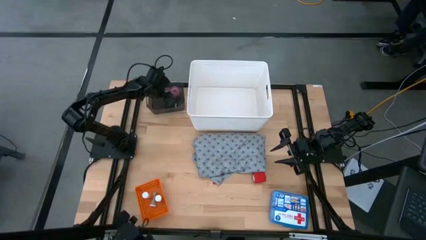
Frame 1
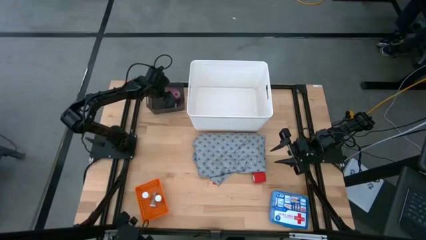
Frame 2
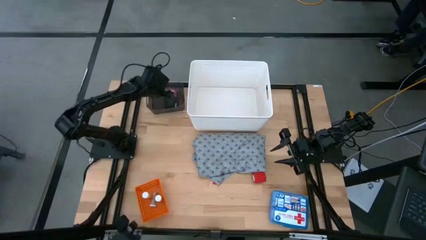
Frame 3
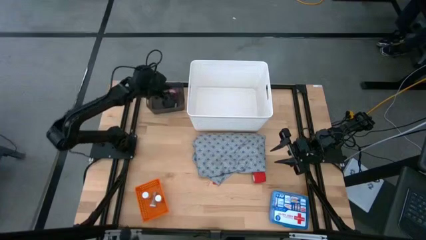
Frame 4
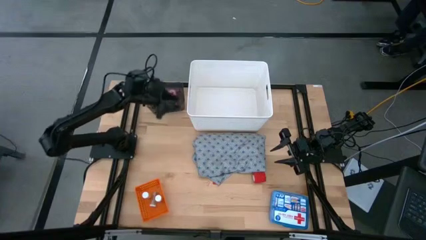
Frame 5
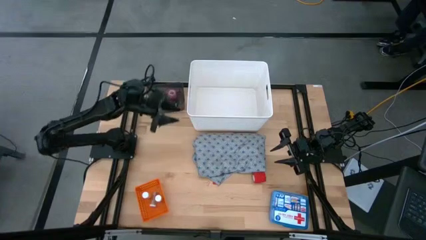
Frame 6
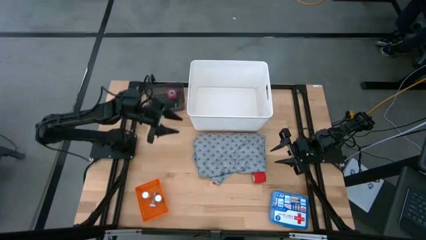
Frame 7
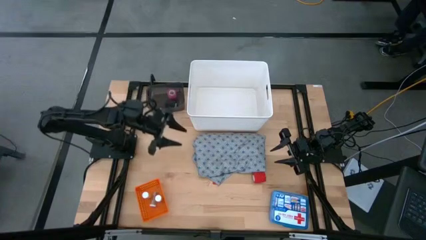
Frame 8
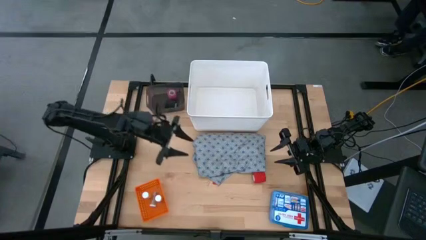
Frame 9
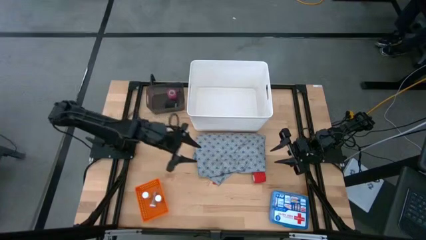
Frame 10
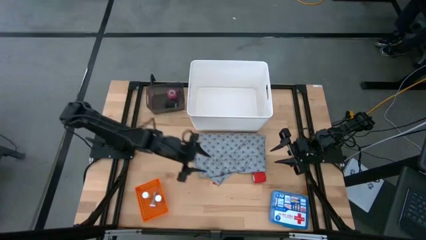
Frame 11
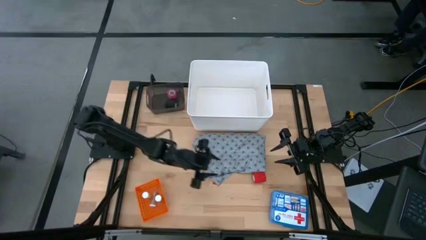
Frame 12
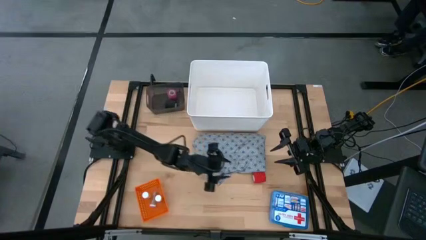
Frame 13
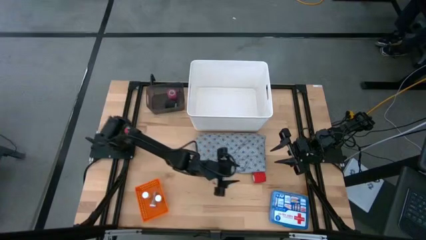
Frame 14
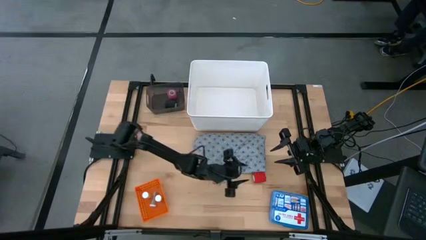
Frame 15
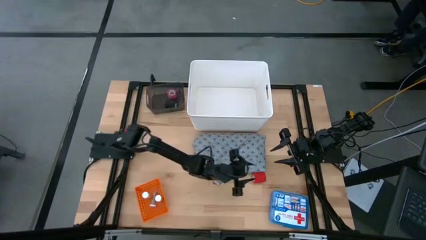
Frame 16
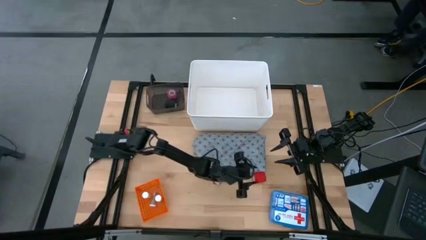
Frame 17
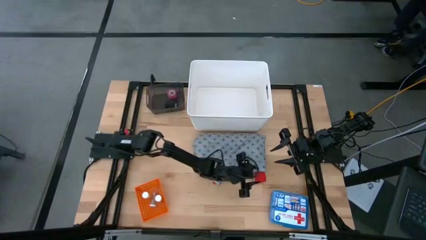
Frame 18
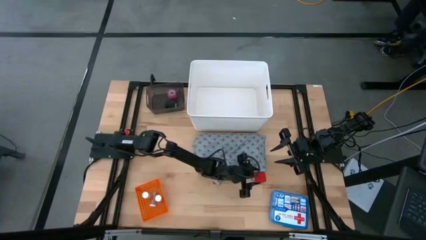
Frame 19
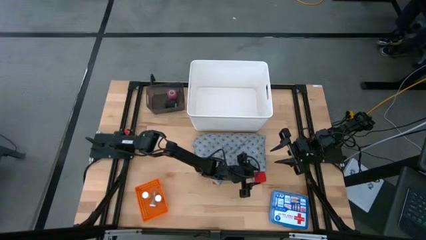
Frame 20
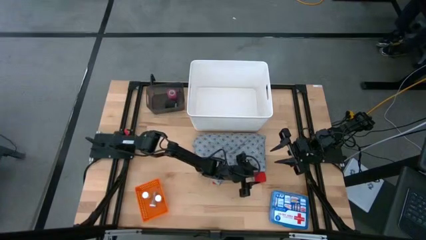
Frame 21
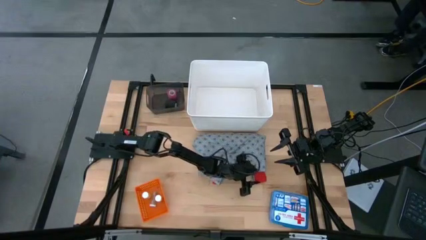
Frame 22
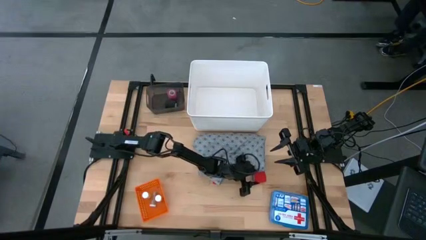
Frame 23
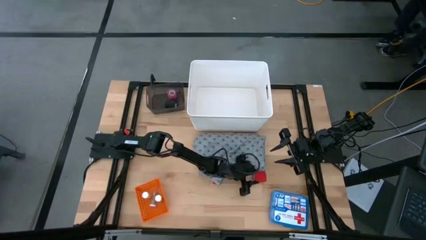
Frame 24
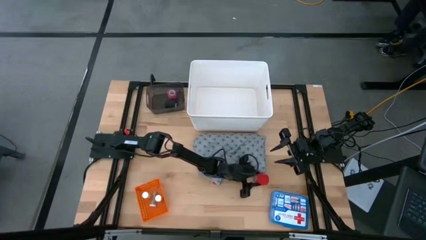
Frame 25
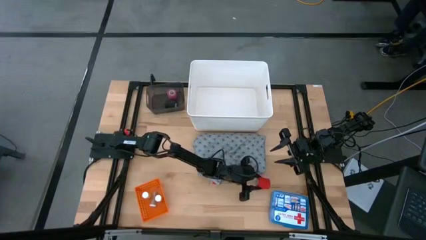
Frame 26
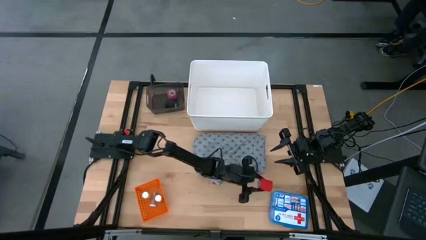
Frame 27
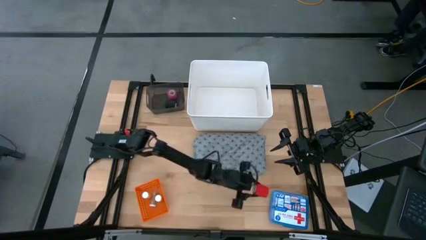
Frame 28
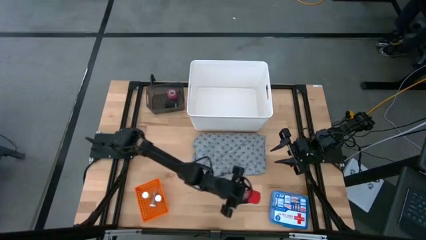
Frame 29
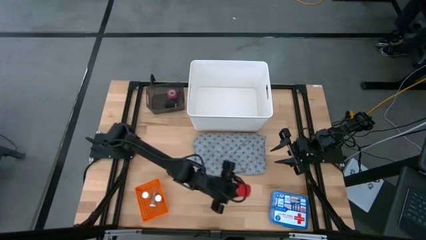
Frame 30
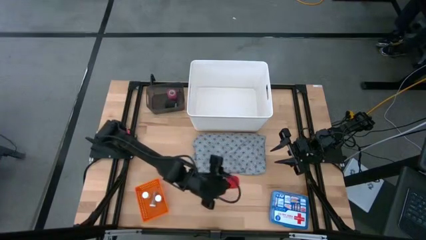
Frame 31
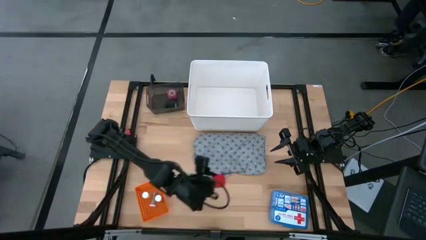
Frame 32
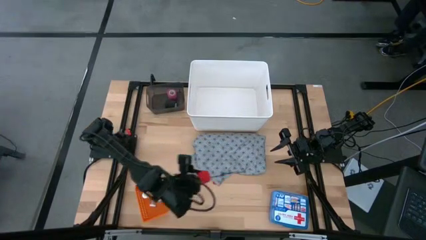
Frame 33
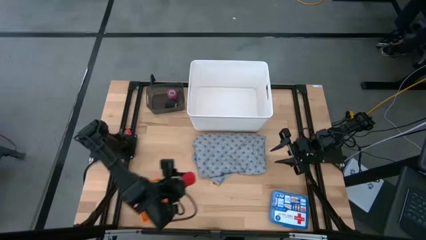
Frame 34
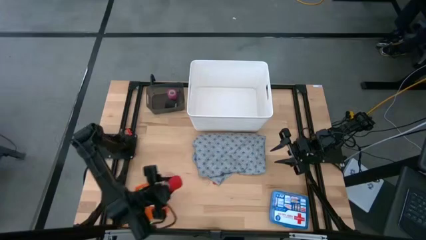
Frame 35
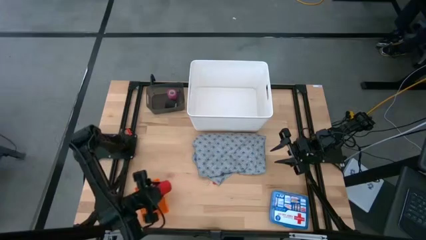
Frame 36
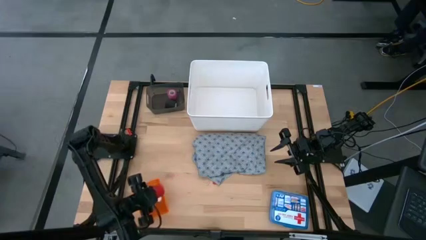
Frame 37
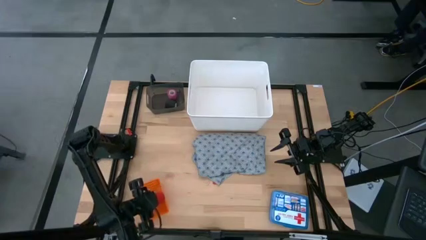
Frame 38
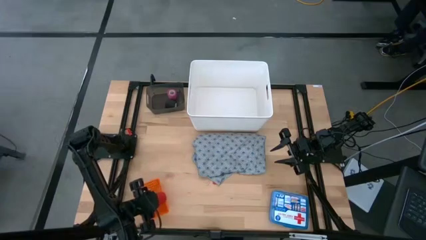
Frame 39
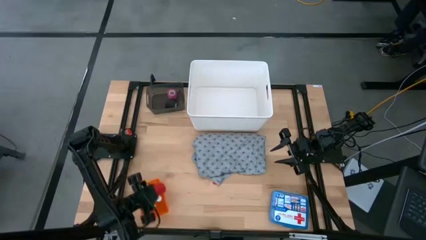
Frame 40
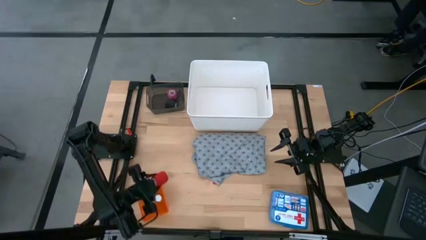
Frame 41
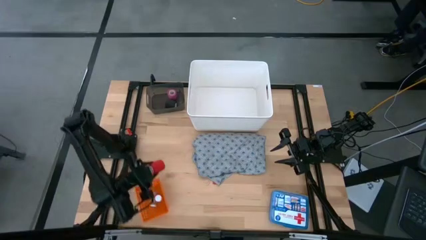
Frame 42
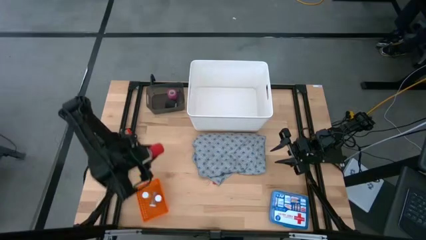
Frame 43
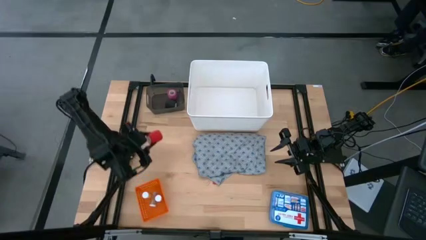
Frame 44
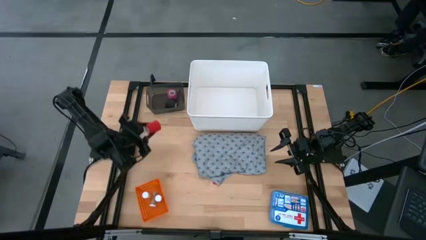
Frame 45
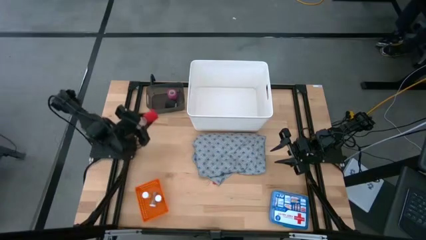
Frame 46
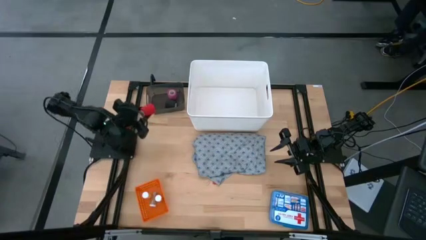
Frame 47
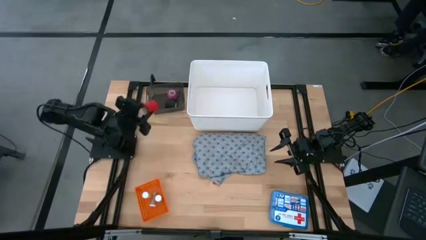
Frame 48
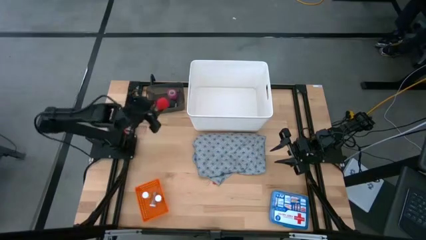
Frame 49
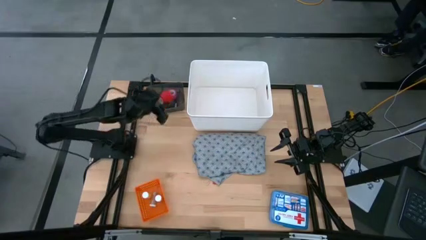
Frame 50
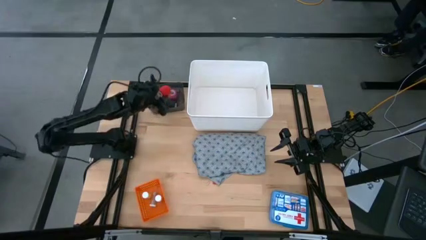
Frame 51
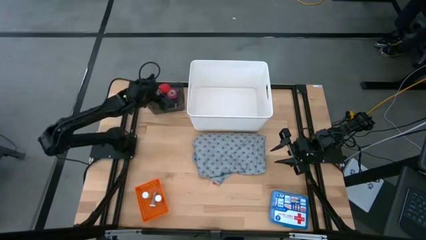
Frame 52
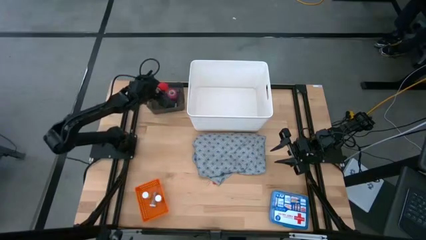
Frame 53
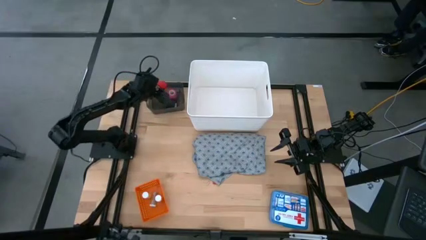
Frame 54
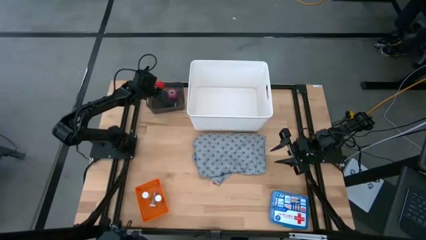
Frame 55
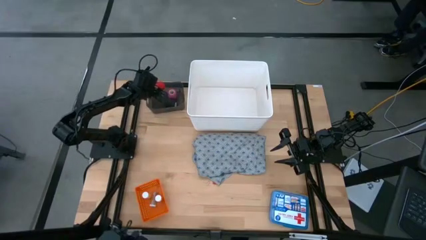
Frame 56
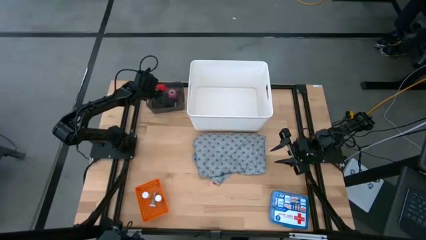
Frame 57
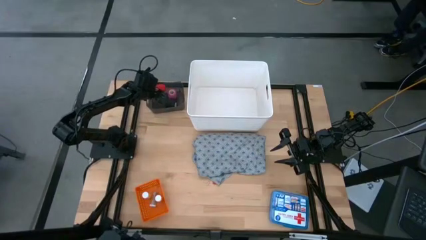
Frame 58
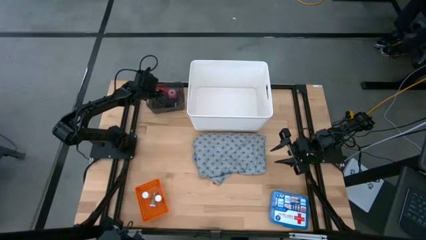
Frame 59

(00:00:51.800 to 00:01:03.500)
Task: Pick & Place Medicine items
Put the red bandage into the black bin

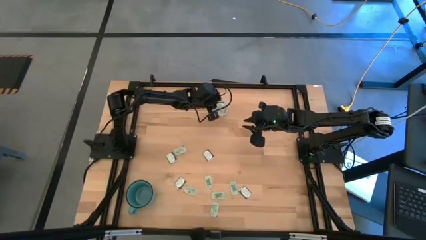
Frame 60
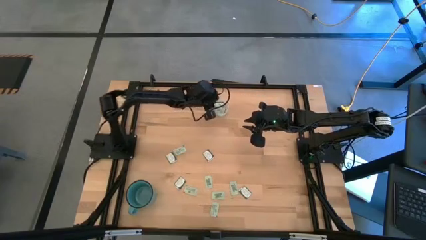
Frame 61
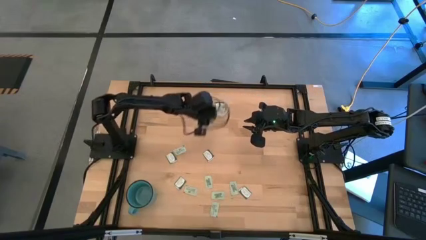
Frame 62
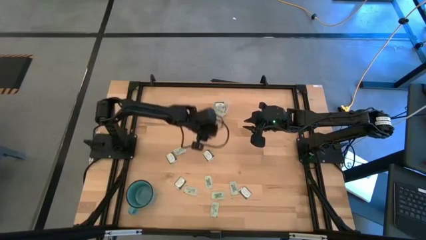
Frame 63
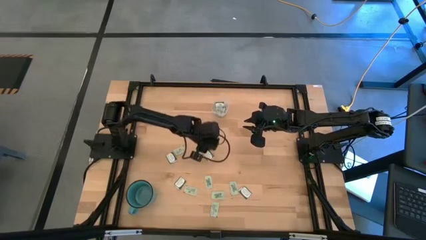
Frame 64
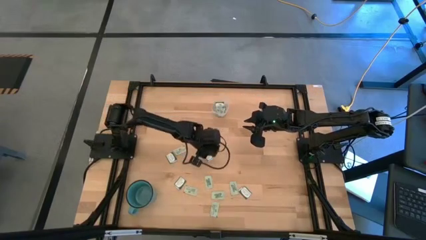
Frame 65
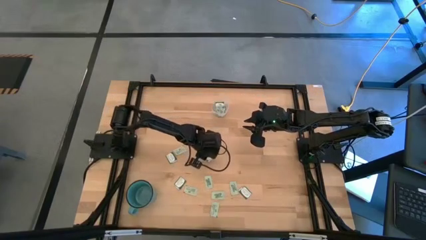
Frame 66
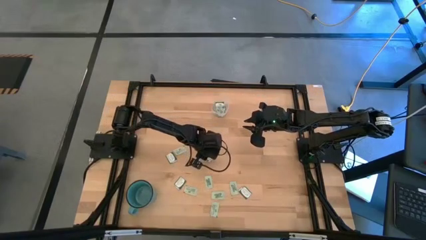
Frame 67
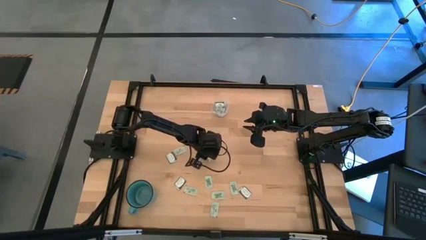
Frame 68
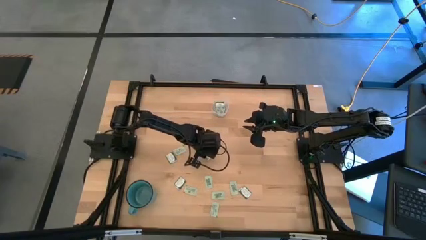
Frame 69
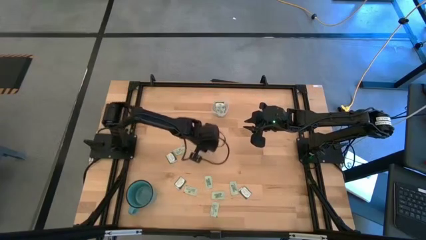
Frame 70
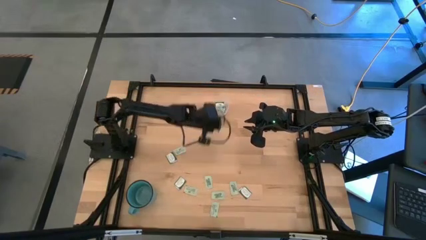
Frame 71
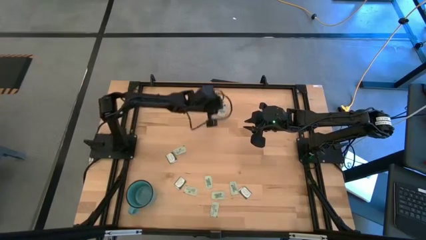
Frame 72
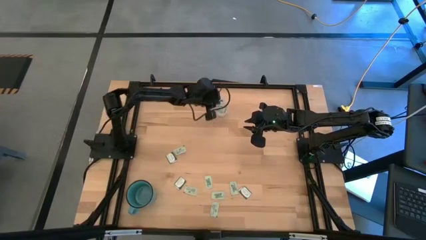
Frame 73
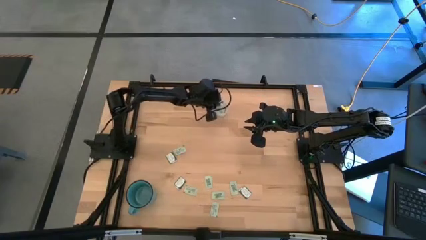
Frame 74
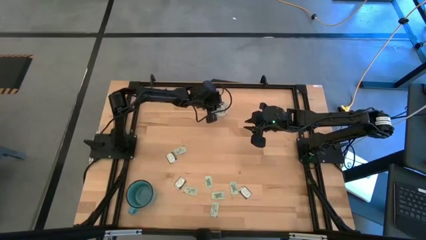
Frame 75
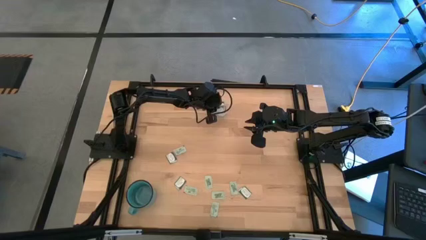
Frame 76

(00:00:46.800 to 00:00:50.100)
Task: Pick and place items into bin
Put the green stevia packet into the transparent bin

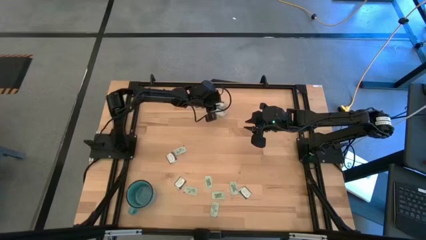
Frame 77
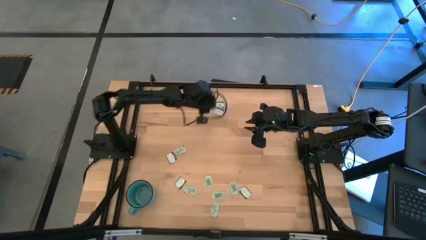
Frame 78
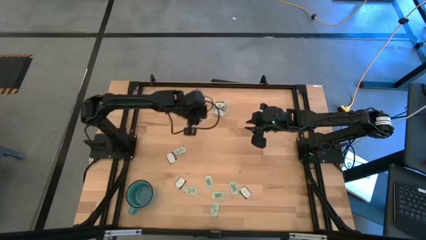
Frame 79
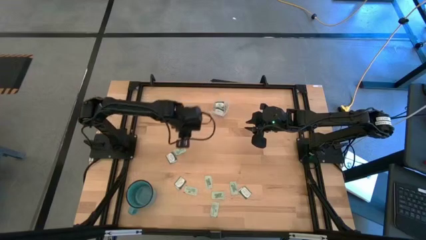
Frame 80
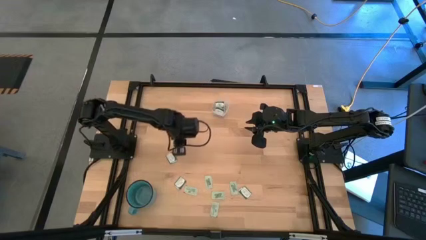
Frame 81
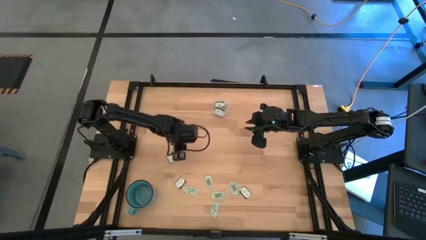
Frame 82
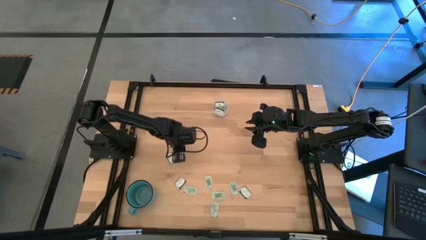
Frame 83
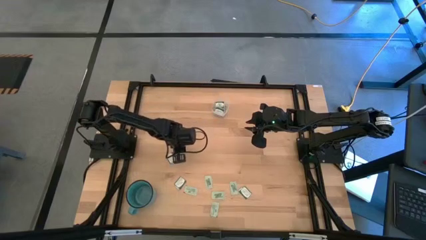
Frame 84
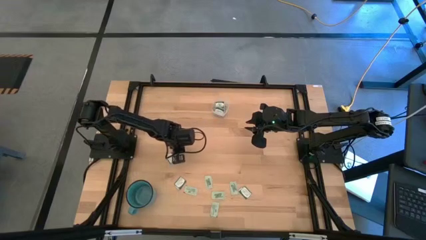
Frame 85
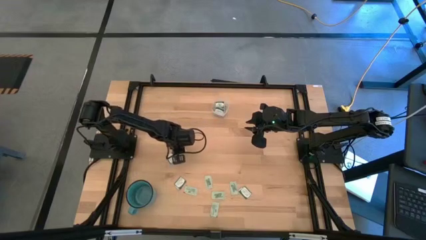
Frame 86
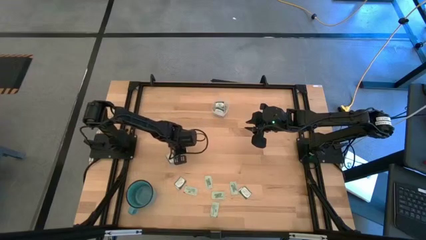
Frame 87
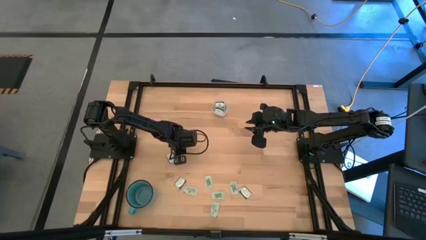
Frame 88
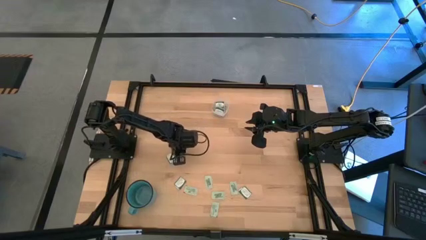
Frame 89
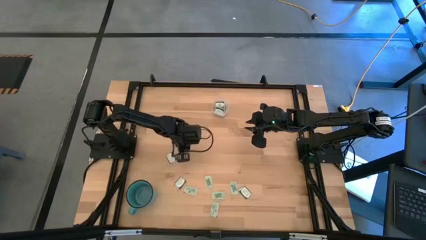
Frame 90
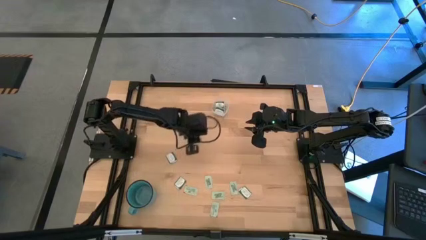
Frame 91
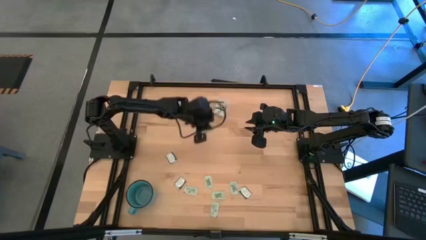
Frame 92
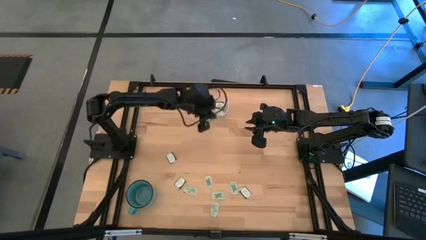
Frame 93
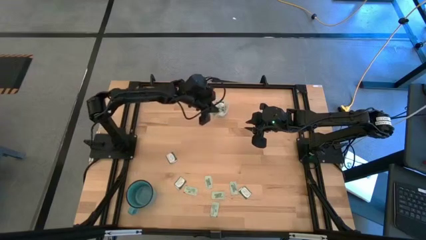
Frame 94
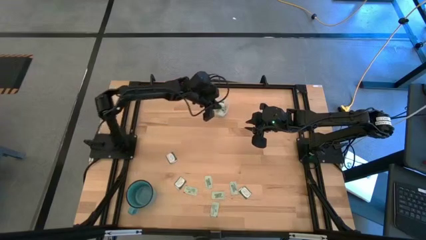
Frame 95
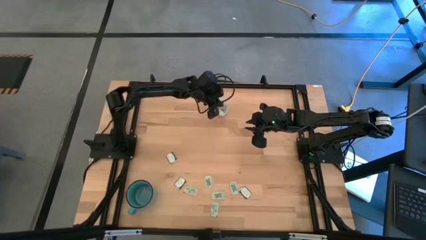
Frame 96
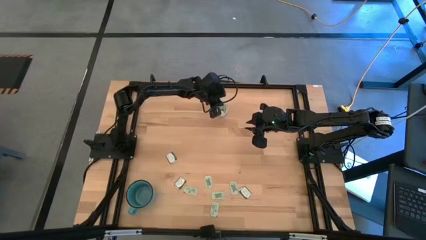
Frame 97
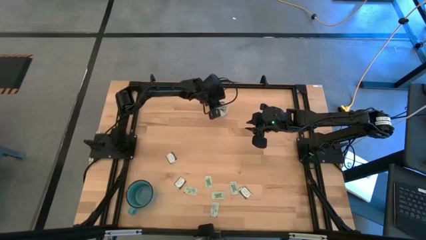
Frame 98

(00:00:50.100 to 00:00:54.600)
Put the light green stevia packet into the transparent bin
